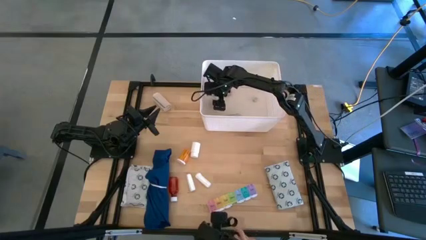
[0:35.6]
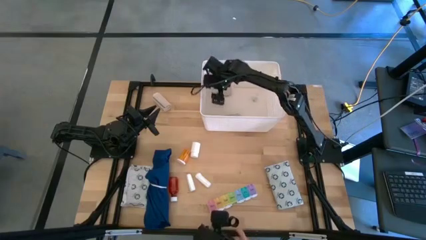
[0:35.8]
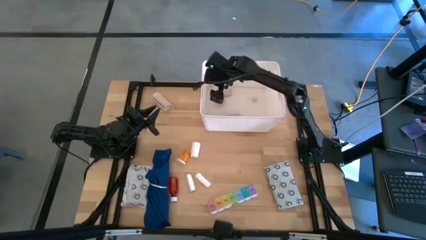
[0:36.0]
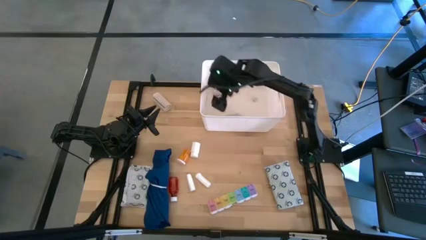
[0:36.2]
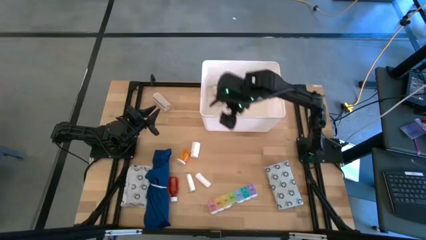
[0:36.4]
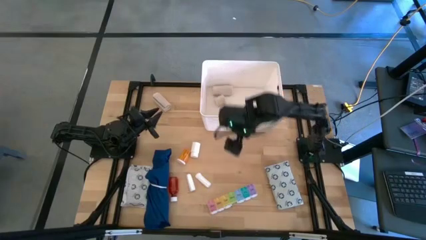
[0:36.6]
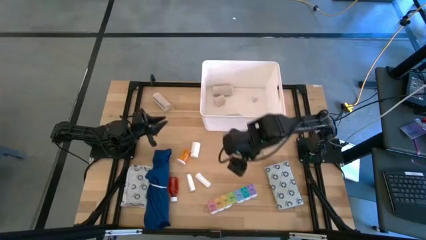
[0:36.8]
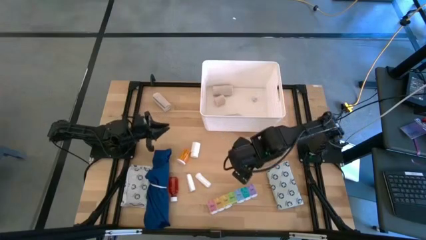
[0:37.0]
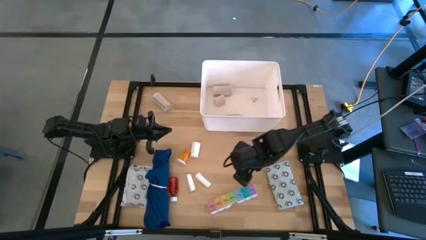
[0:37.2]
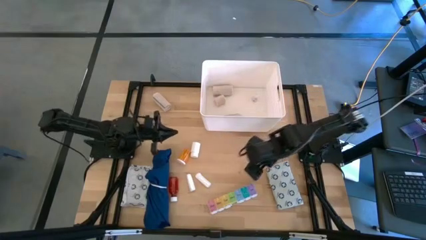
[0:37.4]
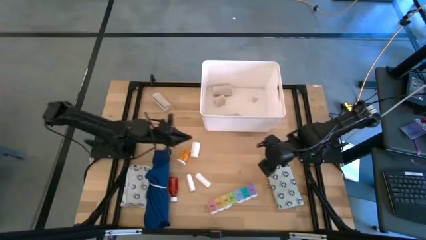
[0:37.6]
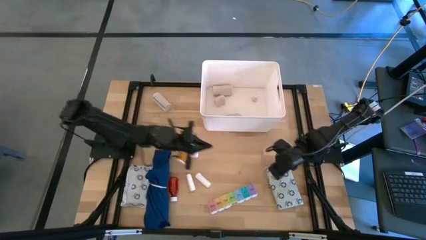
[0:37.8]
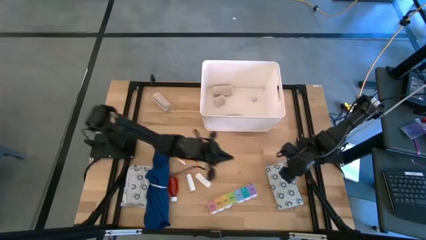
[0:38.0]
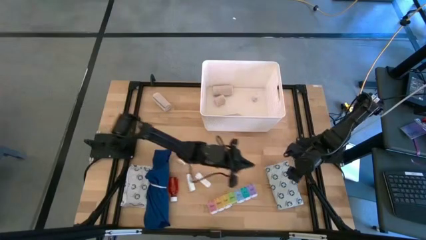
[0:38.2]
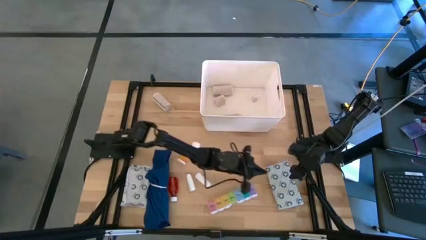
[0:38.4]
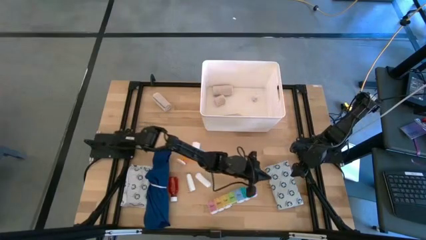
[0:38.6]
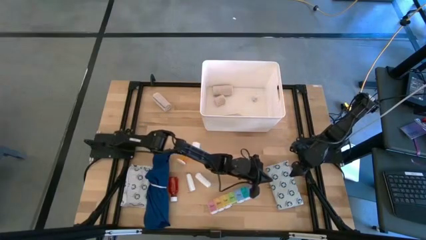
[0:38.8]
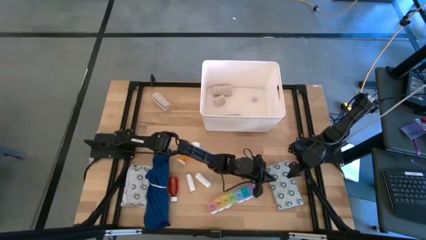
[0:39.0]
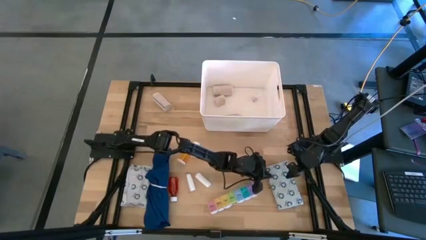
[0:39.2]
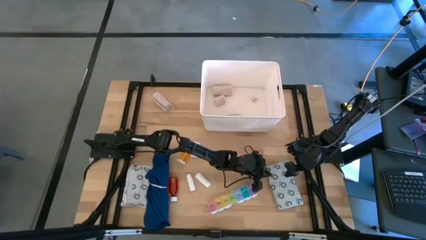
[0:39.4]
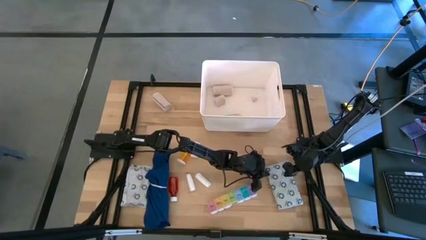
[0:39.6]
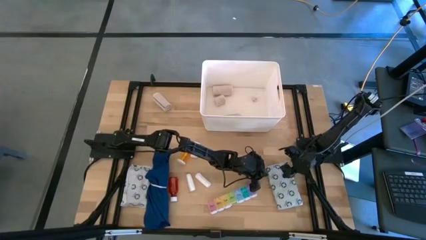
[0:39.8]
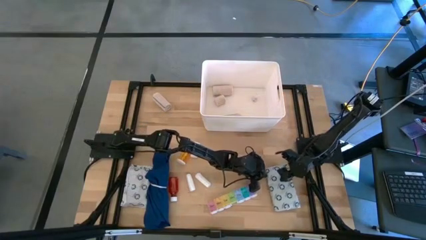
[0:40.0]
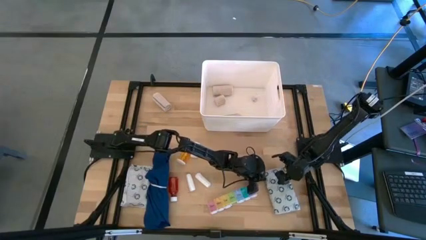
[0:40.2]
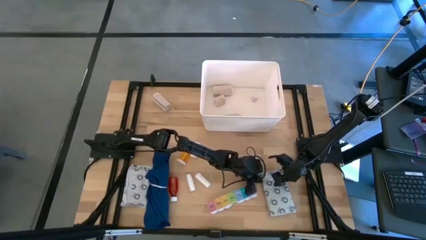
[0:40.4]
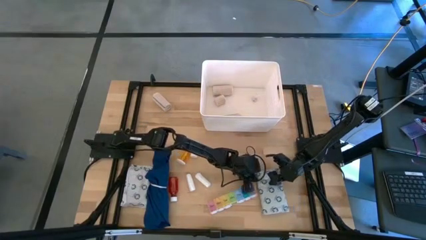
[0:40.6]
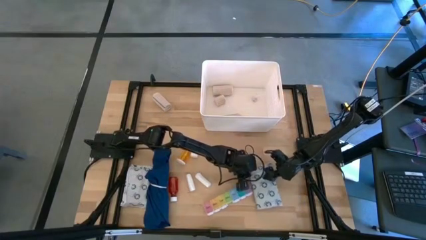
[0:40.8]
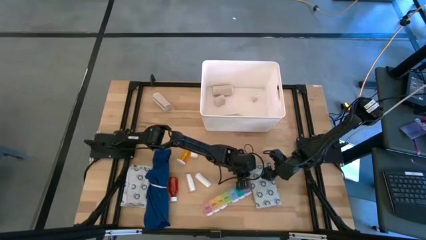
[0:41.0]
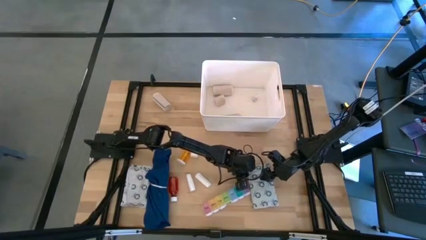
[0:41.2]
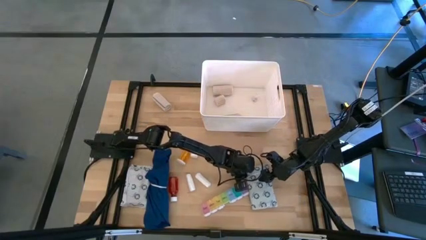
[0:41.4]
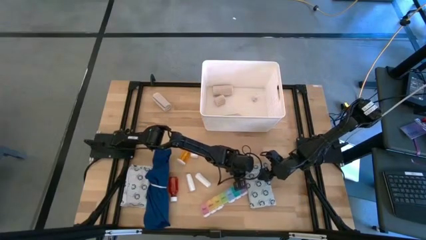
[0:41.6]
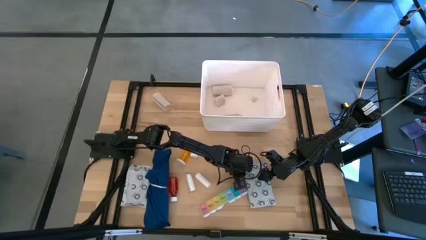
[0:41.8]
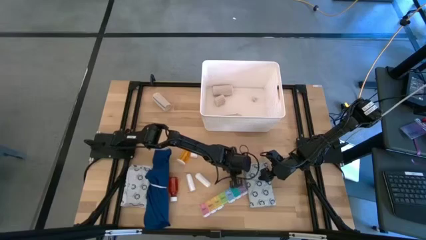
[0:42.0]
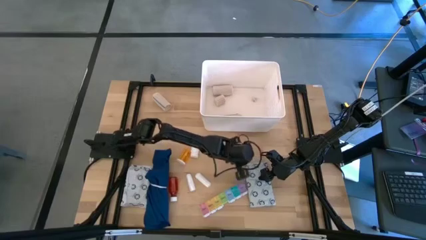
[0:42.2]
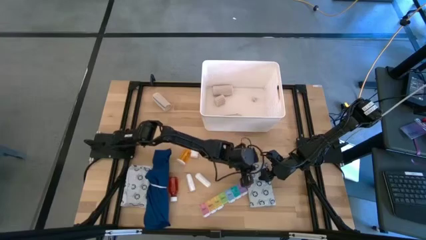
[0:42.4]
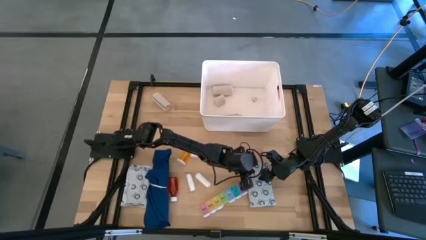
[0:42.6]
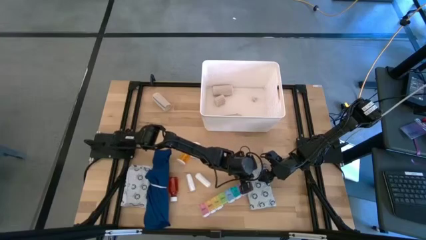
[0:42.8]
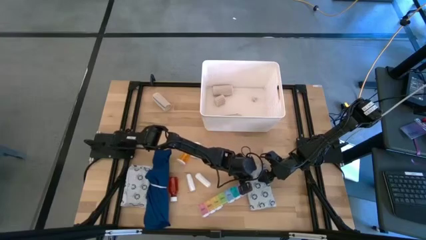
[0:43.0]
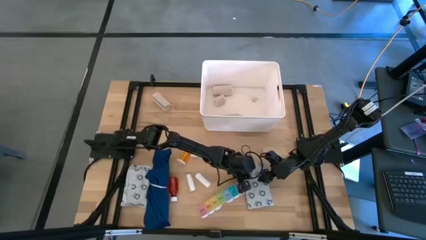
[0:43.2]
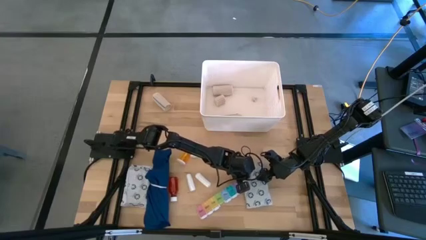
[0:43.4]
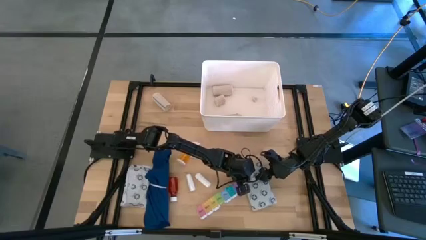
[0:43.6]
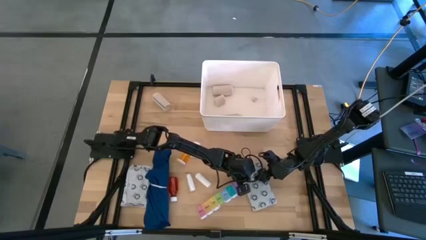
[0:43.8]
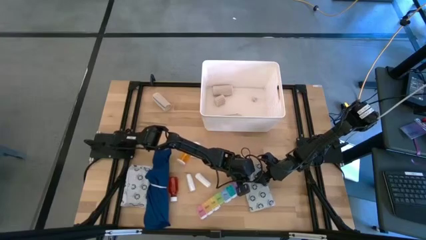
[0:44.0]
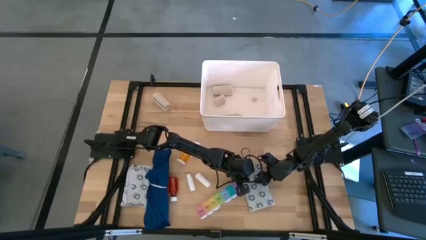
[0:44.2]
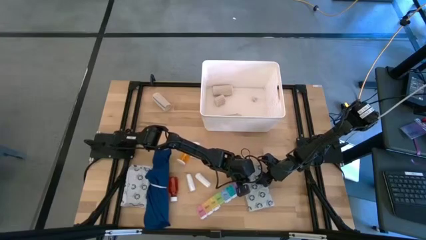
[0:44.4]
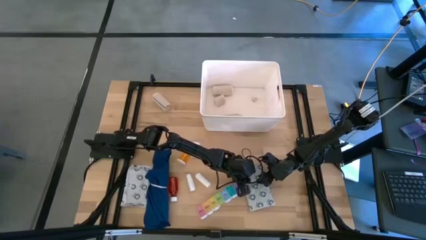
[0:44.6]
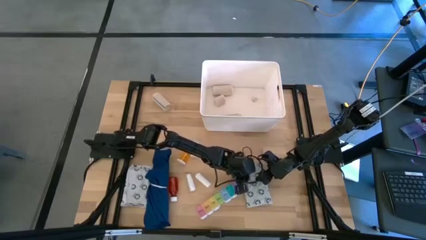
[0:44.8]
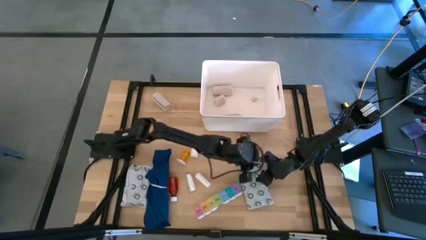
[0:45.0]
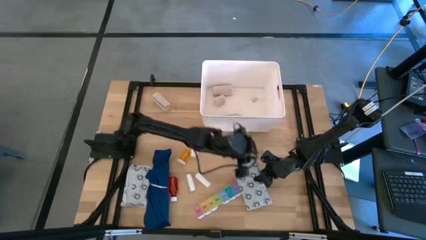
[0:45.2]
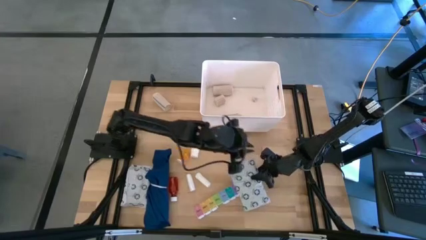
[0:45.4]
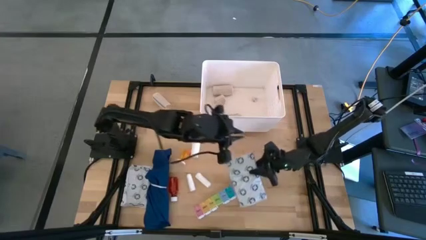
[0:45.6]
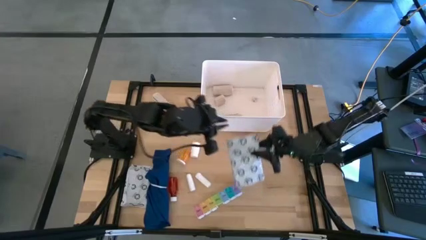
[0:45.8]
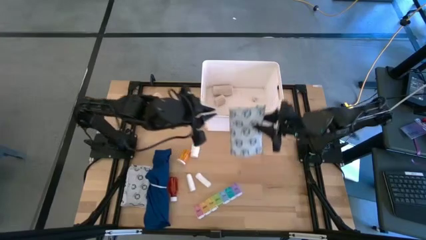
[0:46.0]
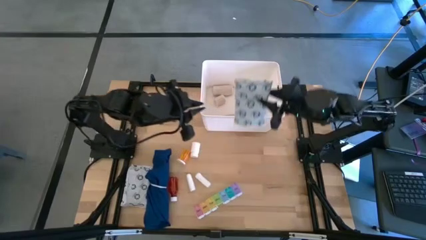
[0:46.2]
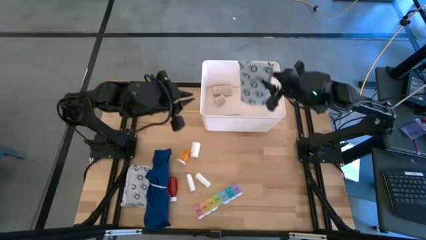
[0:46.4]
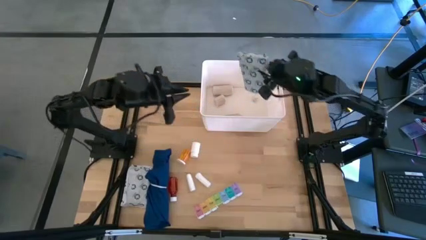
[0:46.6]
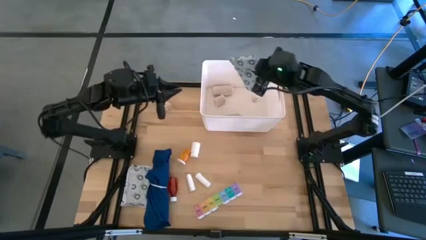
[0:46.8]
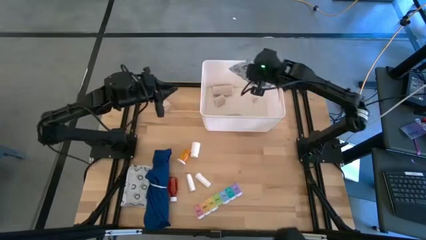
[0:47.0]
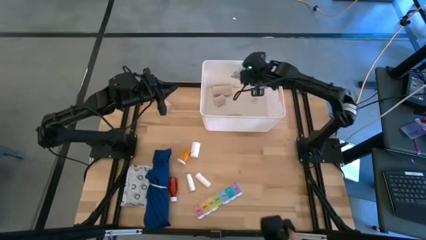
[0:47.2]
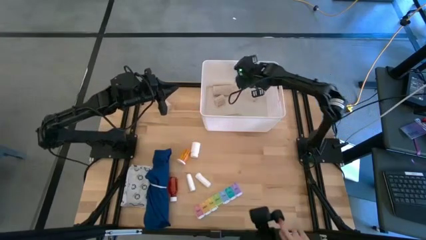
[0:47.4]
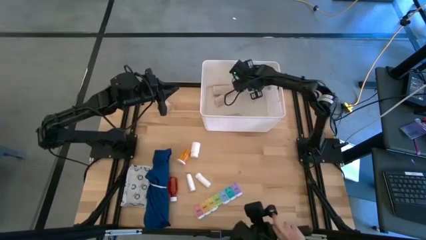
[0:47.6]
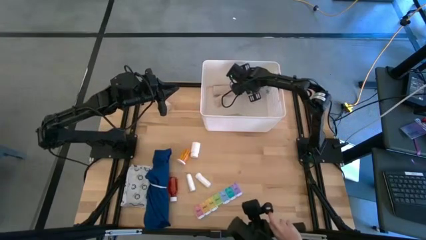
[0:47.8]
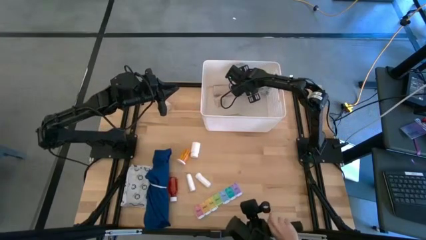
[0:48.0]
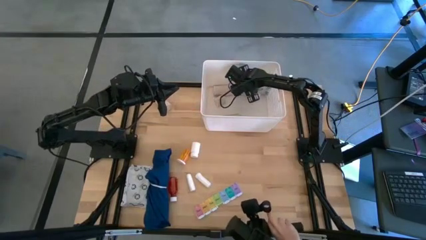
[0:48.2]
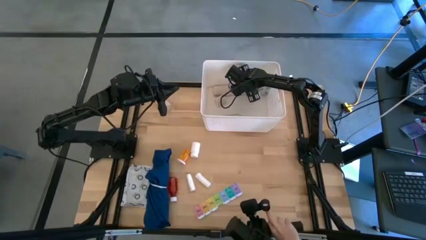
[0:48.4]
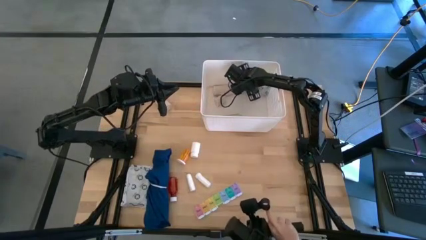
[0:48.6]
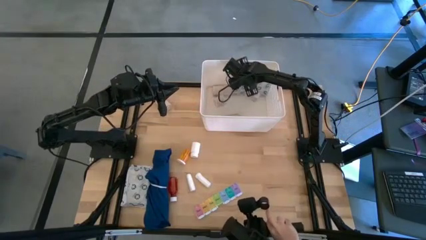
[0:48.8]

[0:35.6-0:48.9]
Task: Pick & place medical supplies in basket/bin
Put the white mailer bag into the white container

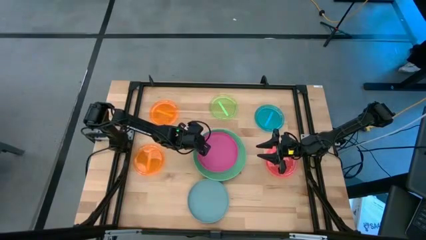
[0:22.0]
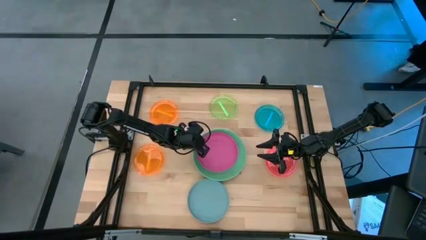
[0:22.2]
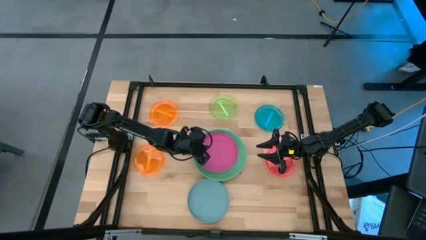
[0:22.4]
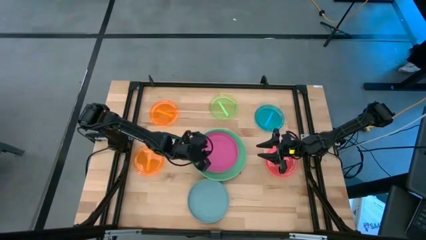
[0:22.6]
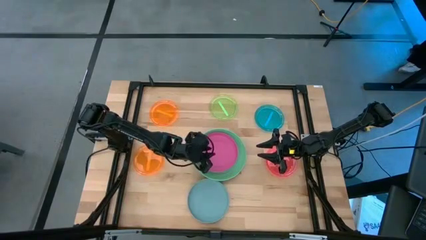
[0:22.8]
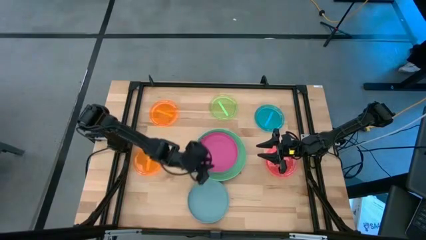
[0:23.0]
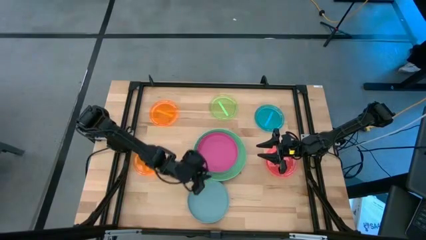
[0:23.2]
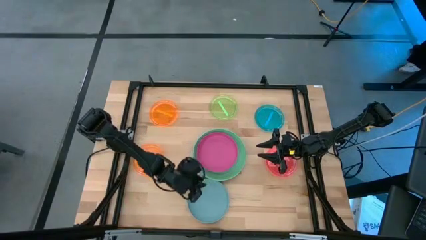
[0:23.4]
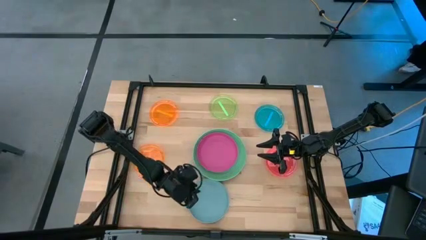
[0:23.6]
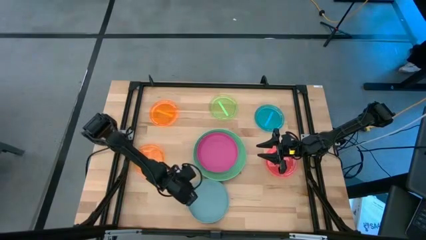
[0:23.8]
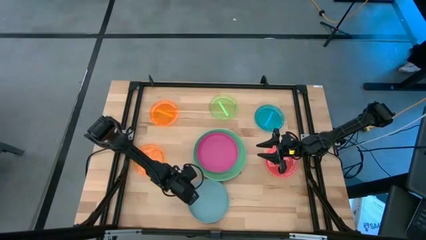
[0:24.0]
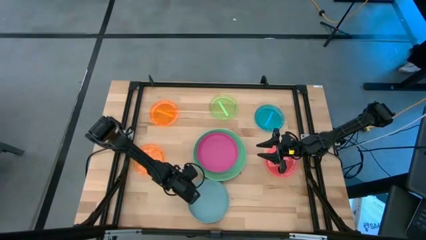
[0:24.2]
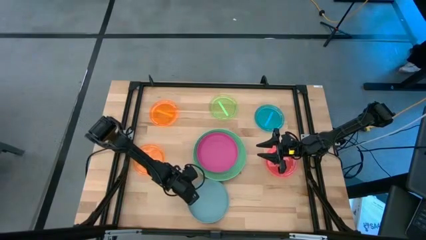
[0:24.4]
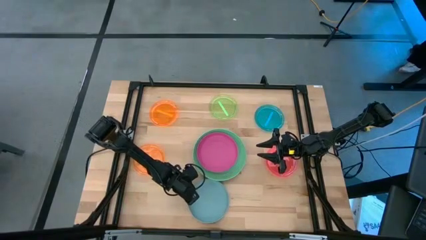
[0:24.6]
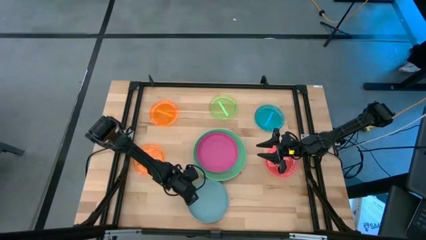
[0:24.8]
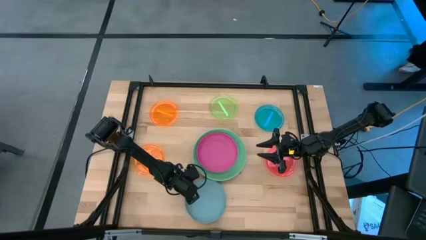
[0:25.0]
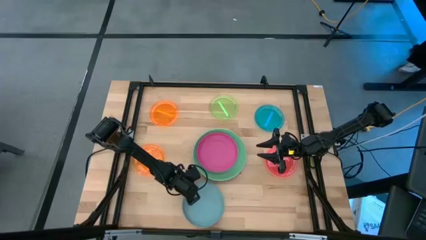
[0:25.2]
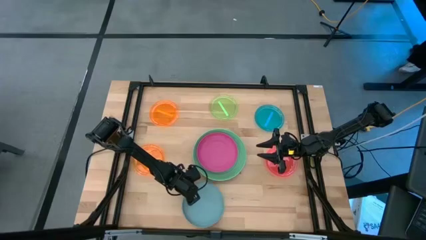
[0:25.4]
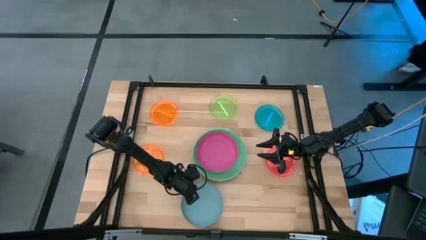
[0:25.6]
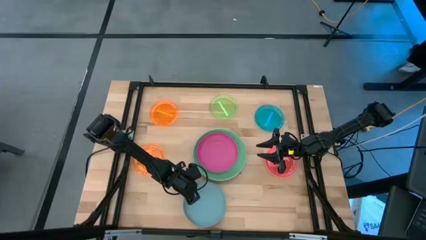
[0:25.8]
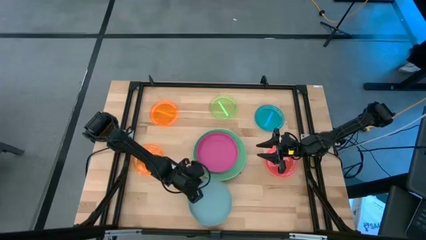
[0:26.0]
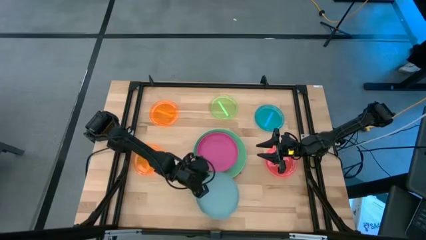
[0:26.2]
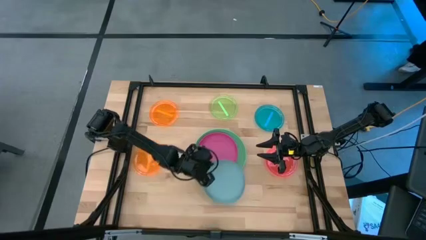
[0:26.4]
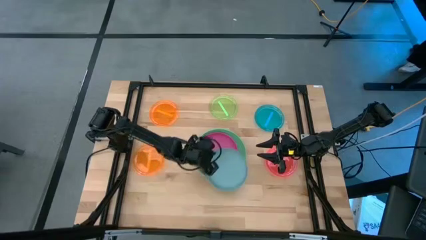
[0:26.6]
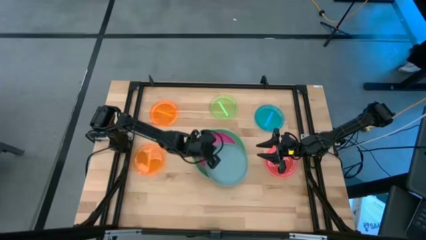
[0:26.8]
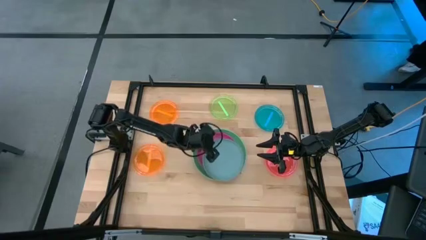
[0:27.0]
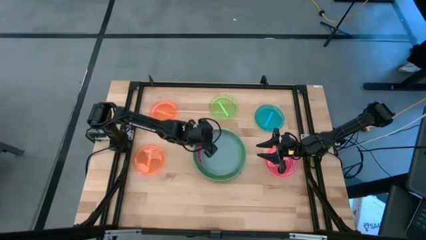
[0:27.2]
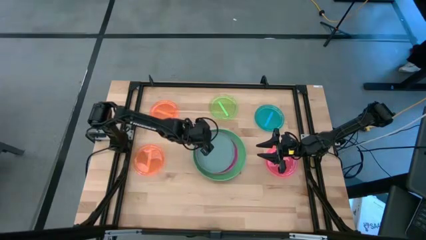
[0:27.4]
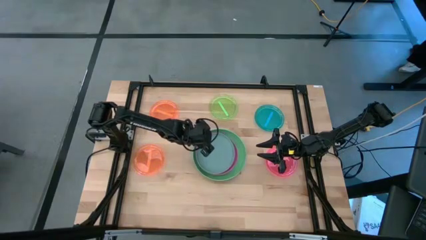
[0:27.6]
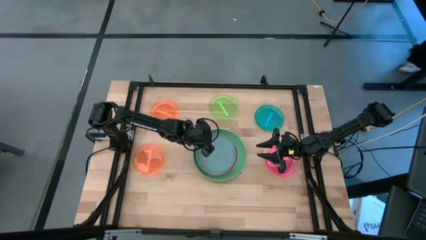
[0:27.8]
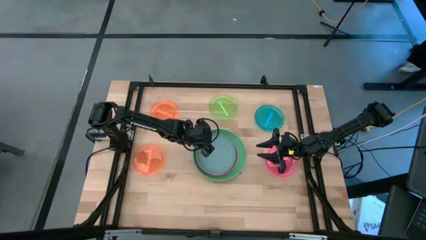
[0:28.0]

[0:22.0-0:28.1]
Task: Stack plastic plates
Stack the light blue plate on top of the pink plate
